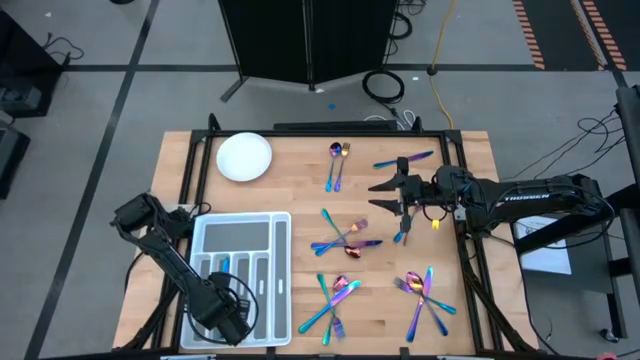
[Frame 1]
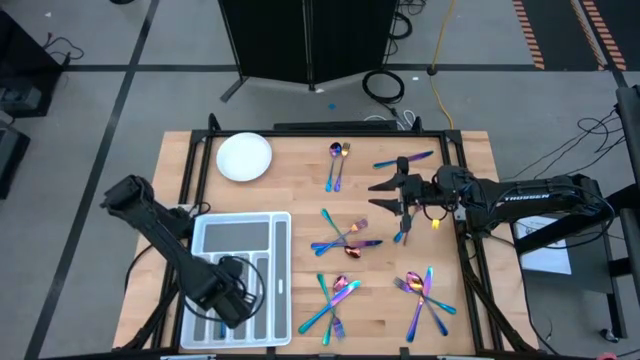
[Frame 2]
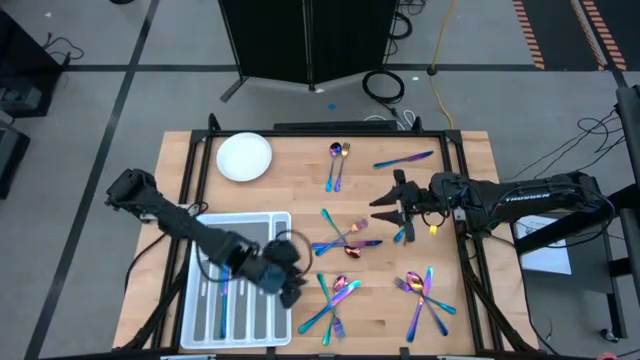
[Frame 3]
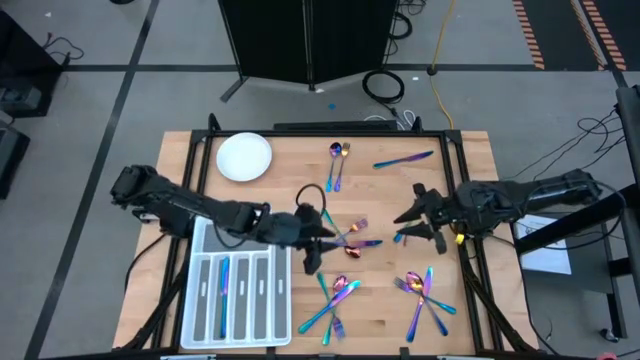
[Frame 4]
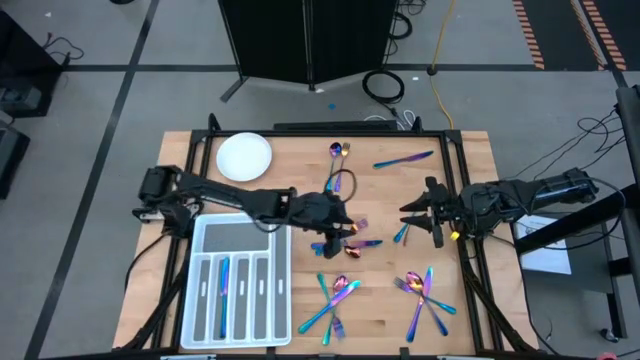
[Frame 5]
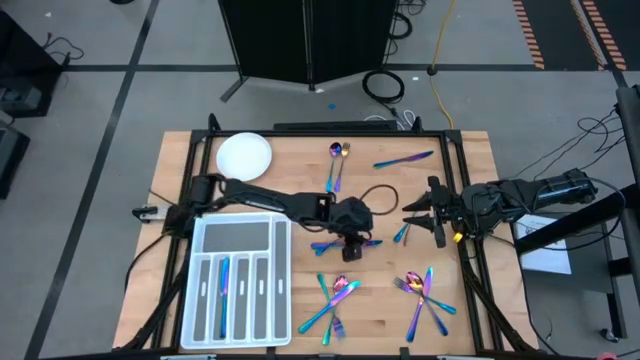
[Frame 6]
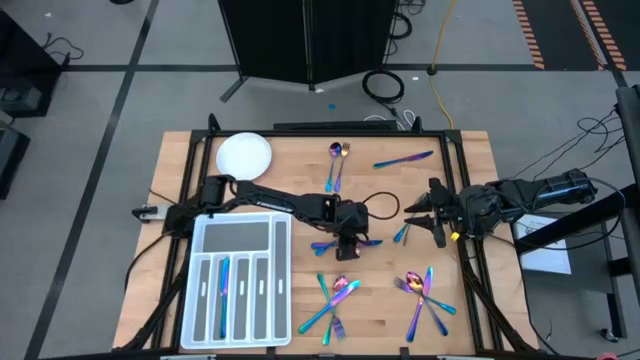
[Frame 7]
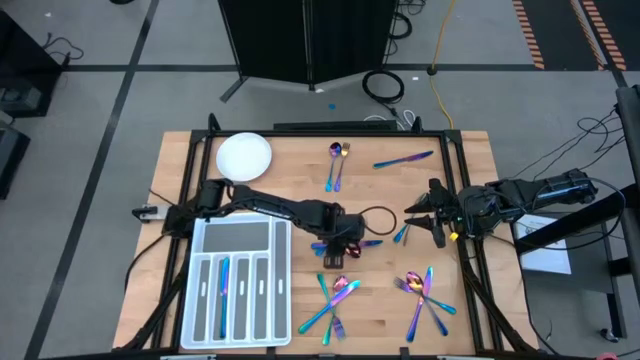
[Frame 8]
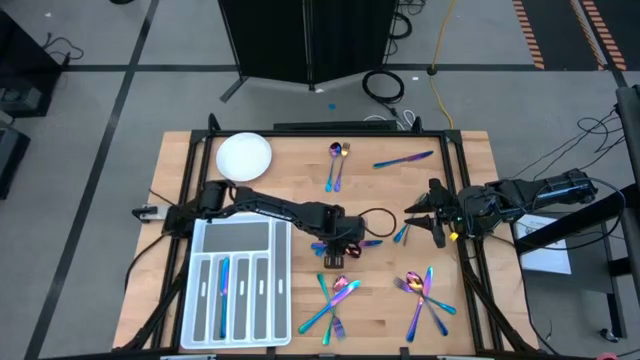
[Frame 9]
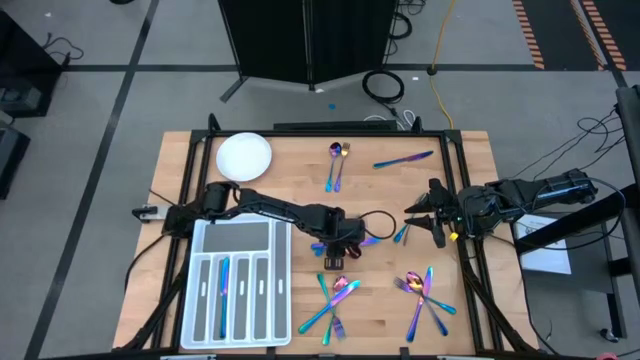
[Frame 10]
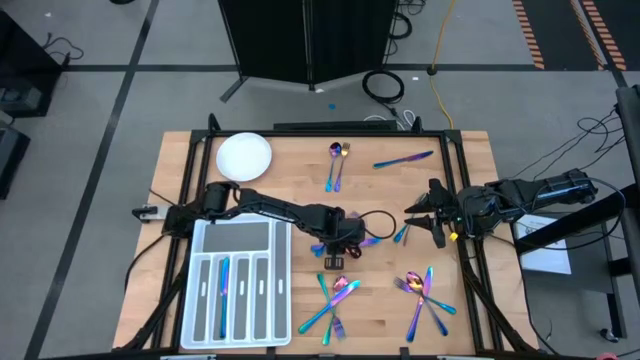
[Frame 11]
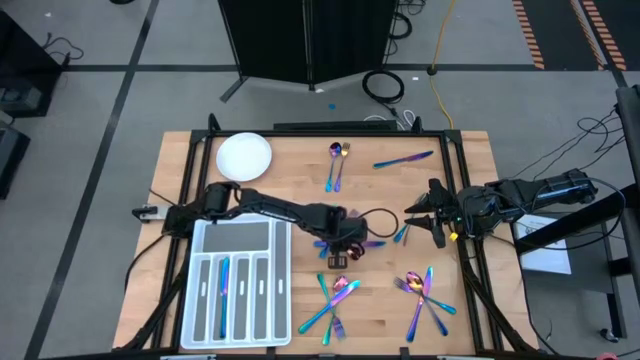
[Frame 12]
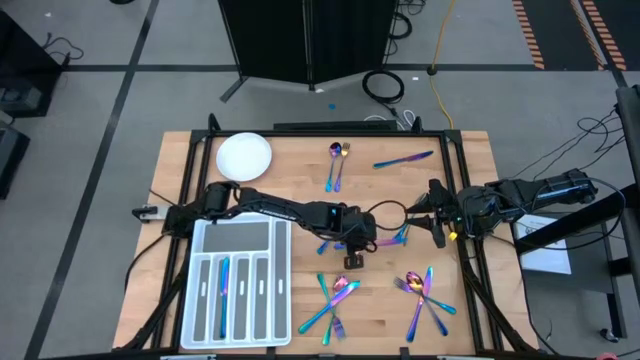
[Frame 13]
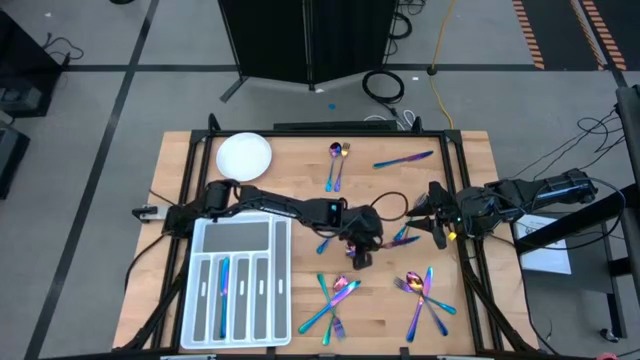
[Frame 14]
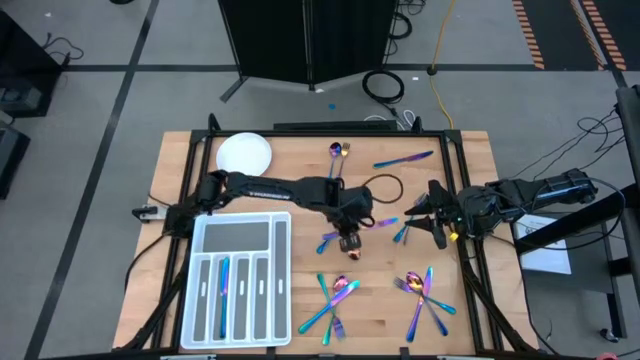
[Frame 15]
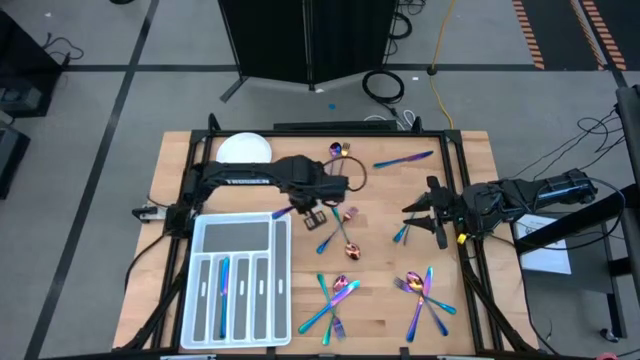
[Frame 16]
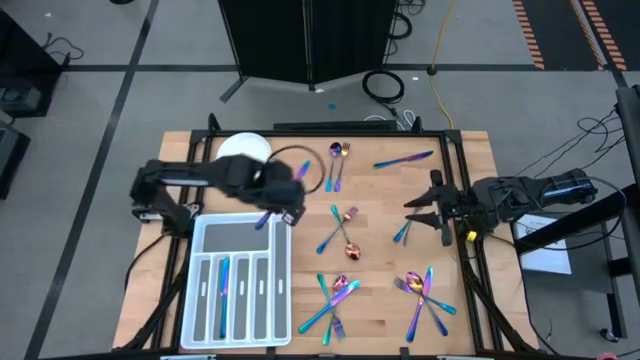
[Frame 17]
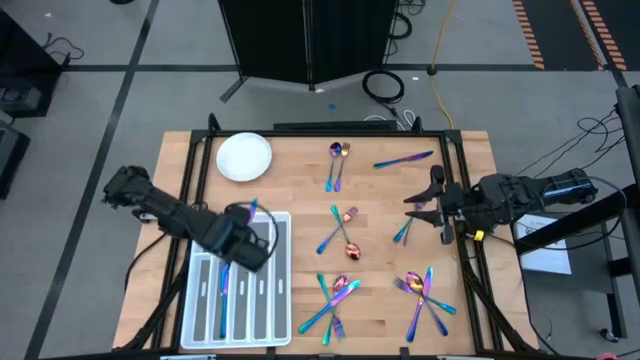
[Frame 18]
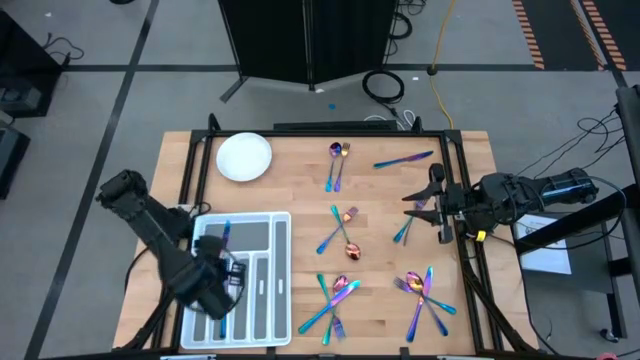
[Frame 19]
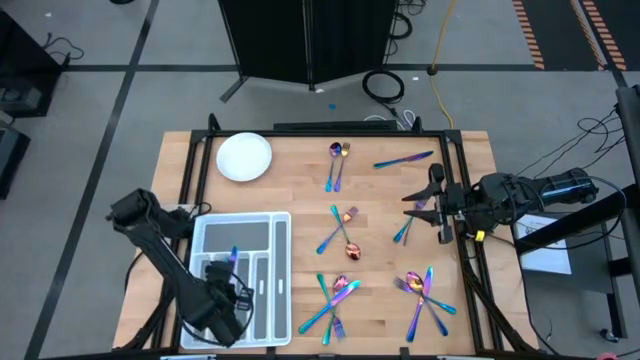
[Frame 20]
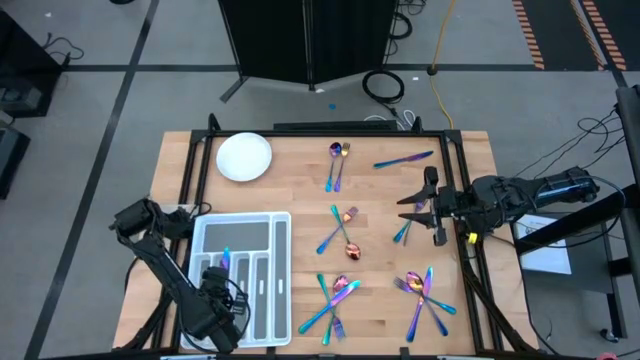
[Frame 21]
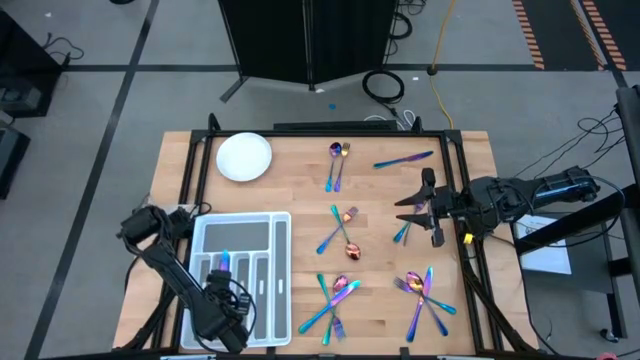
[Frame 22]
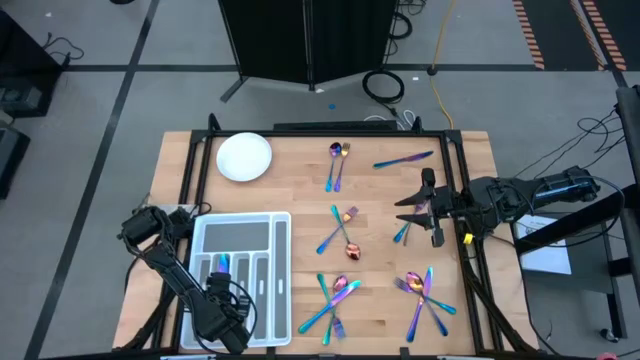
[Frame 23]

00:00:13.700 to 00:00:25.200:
Task: Sort silverware
Put the iridescent blue knife in the silverware tray

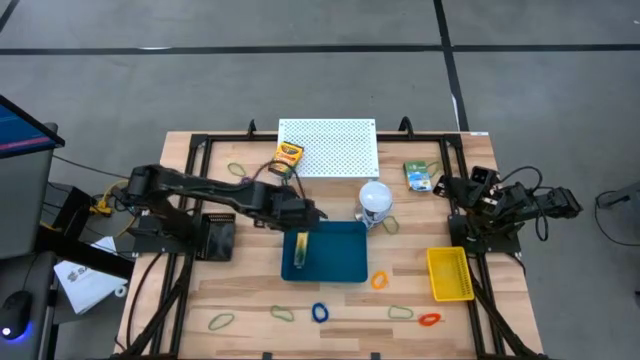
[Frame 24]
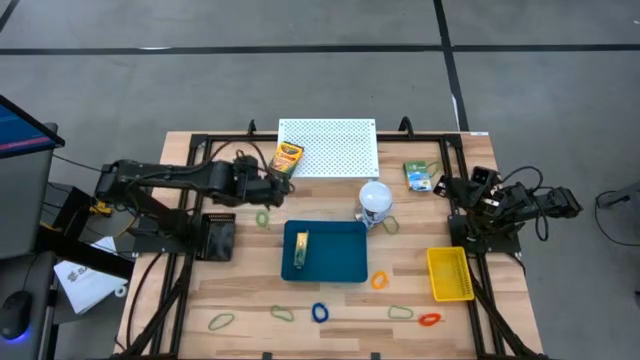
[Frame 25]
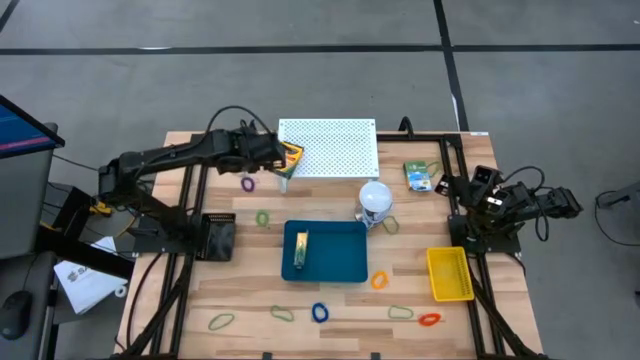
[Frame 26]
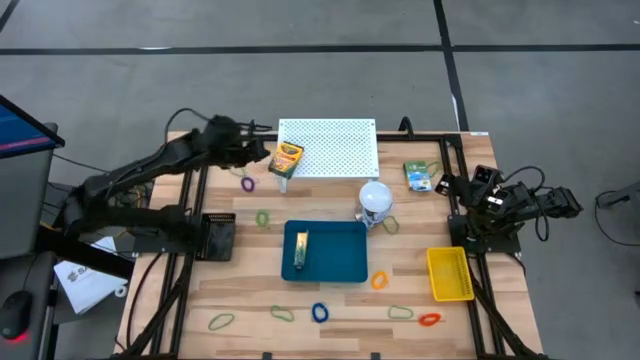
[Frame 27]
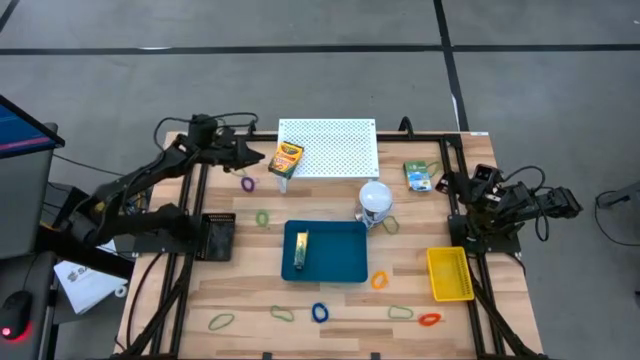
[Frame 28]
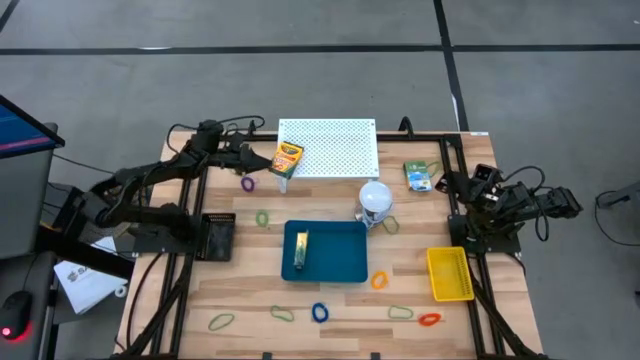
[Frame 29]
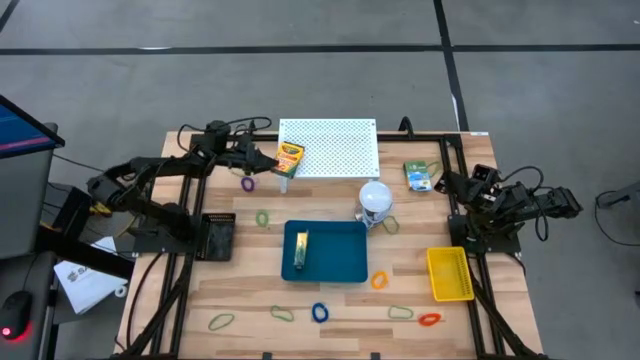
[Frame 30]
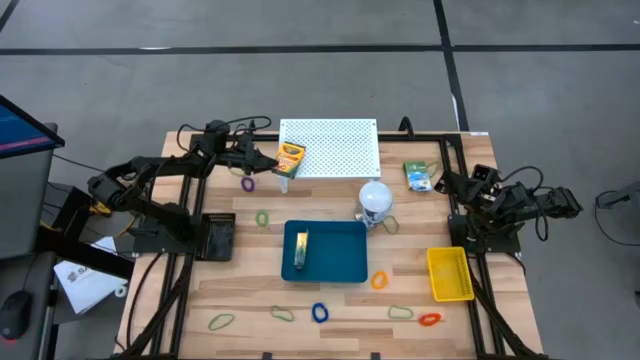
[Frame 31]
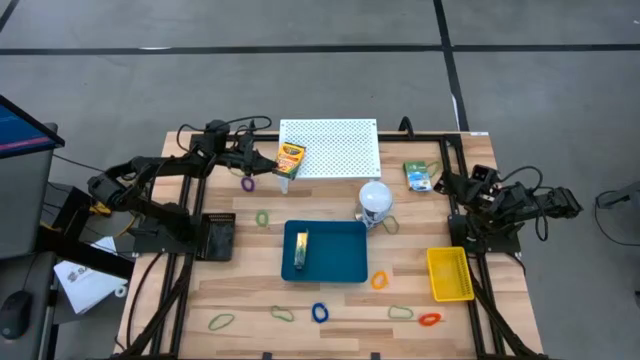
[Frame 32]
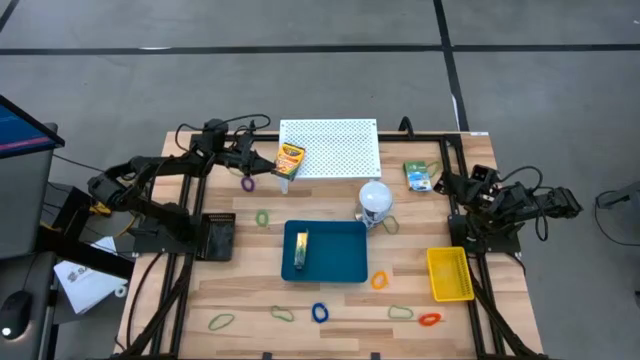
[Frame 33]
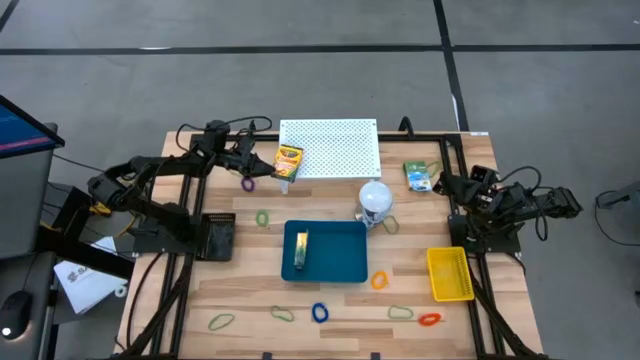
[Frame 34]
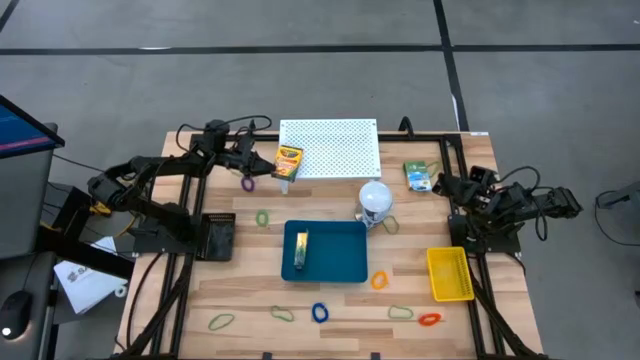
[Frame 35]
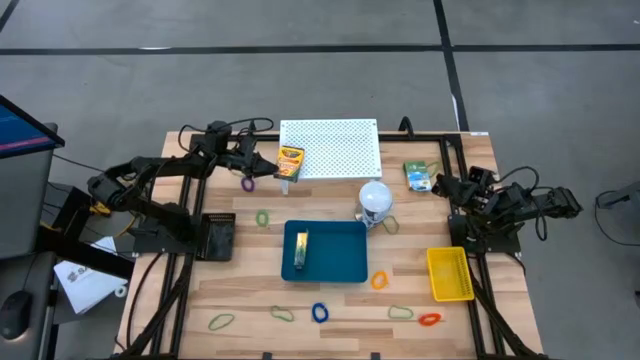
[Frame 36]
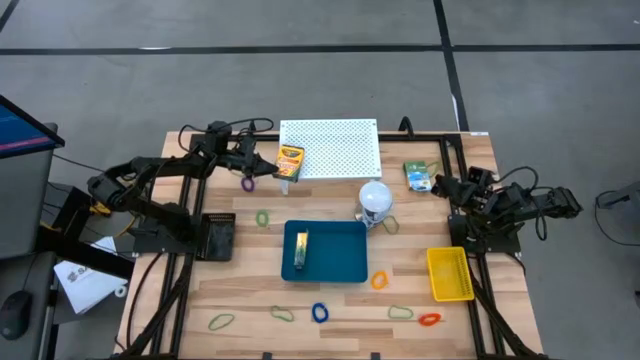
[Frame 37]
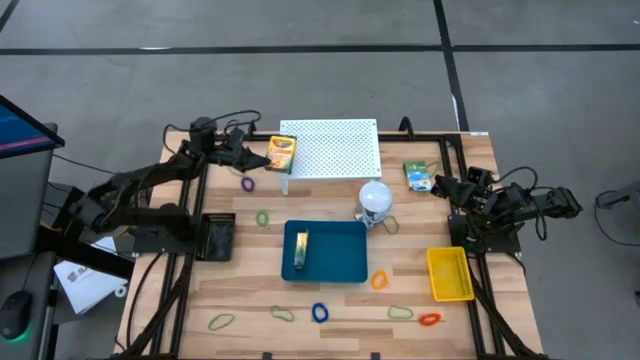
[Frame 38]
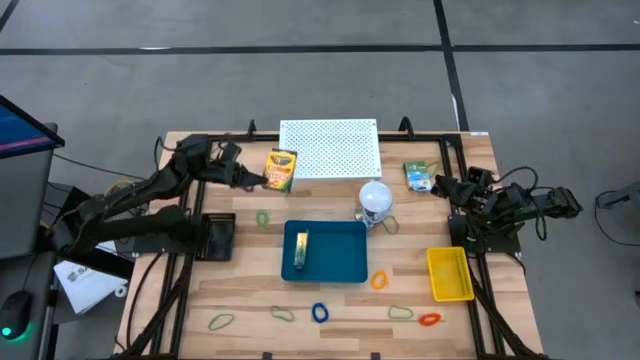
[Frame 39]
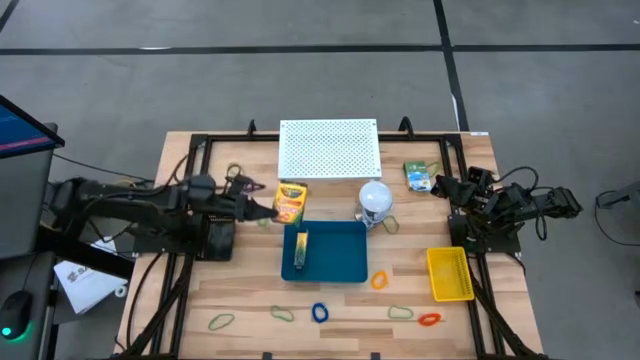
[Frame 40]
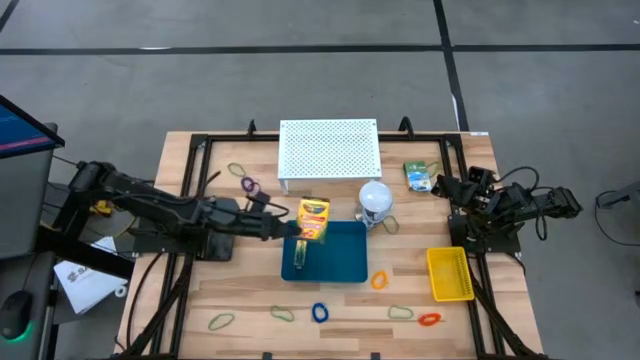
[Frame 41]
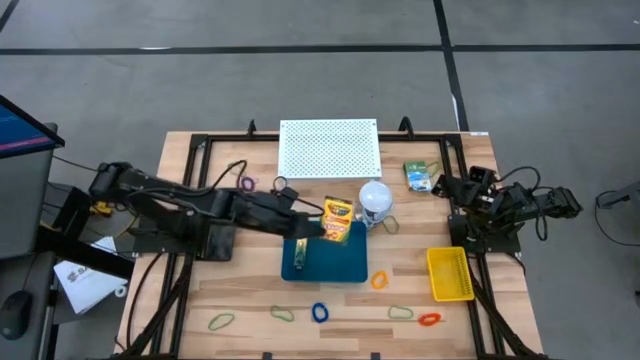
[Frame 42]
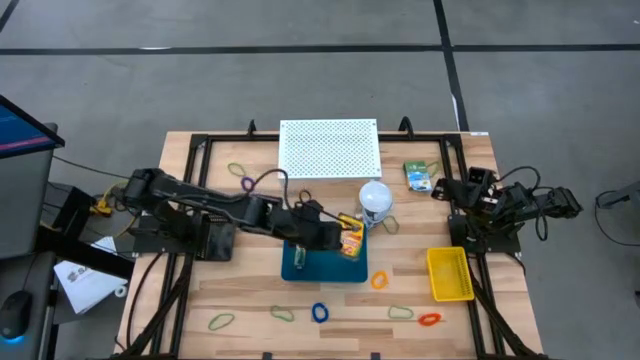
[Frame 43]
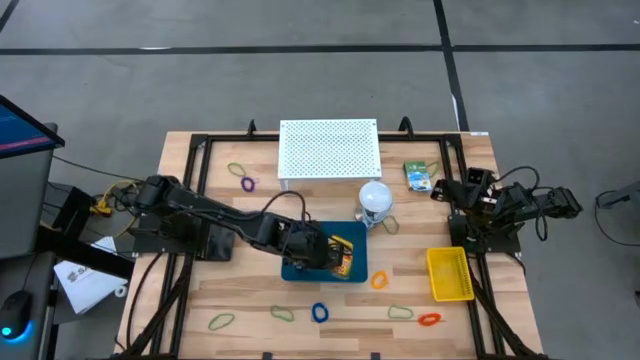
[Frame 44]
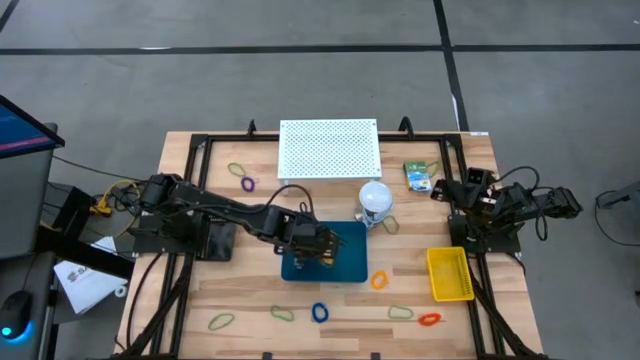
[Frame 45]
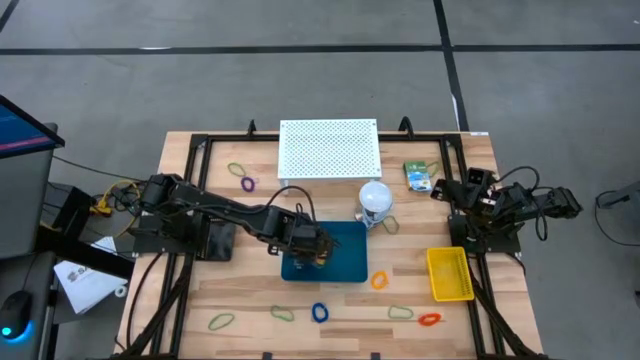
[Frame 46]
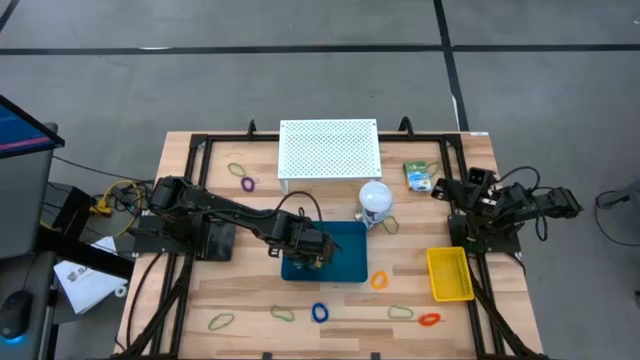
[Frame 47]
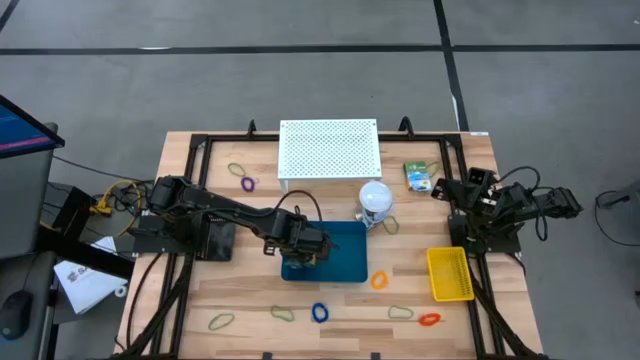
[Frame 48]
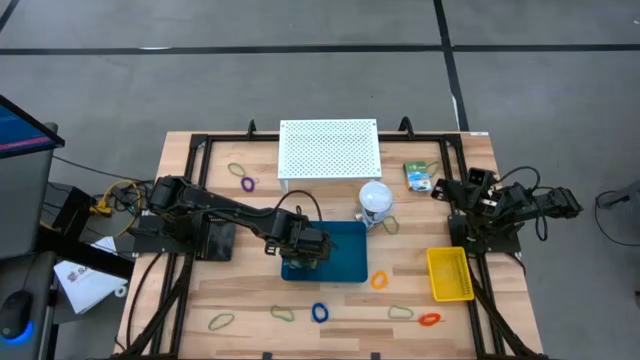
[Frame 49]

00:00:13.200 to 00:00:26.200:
Task: Pick & Place Office Desk Supplies
Put the left crayon box into the blue bin
